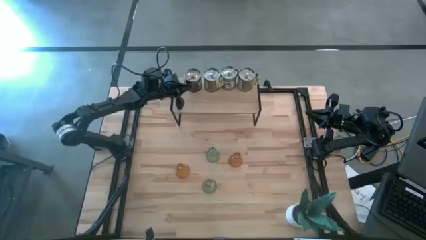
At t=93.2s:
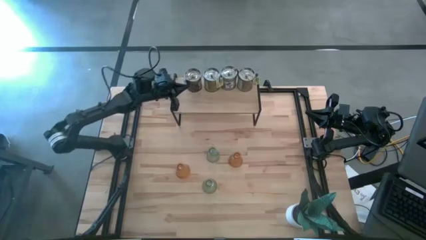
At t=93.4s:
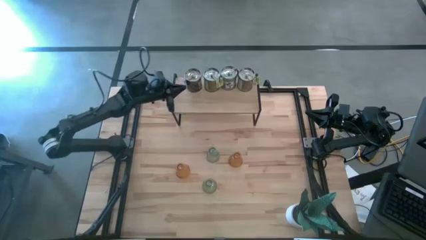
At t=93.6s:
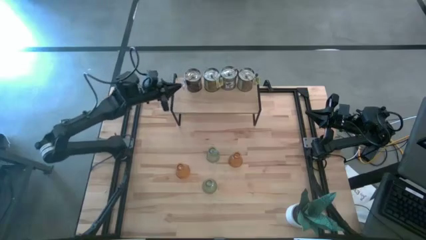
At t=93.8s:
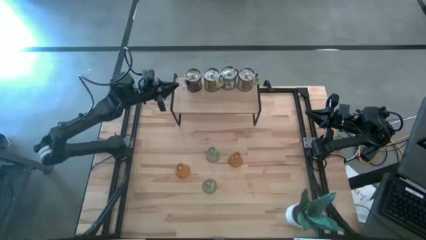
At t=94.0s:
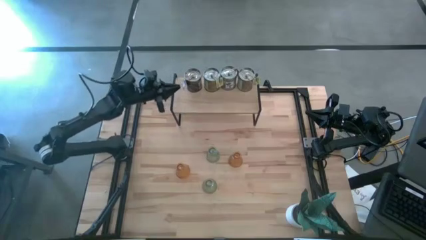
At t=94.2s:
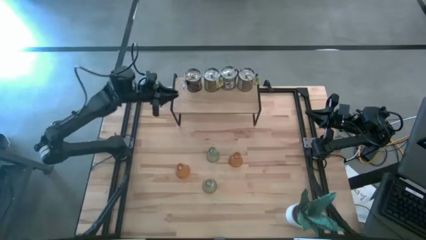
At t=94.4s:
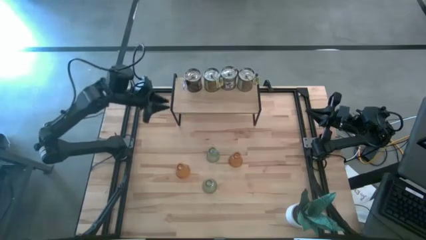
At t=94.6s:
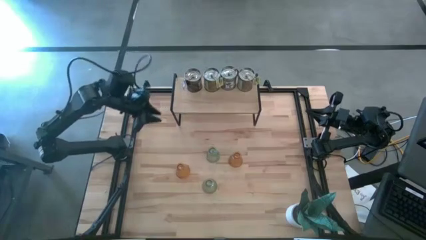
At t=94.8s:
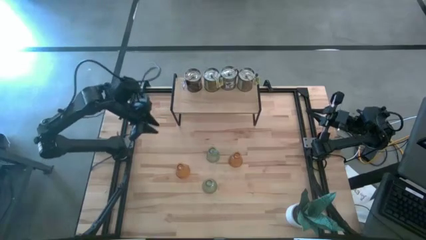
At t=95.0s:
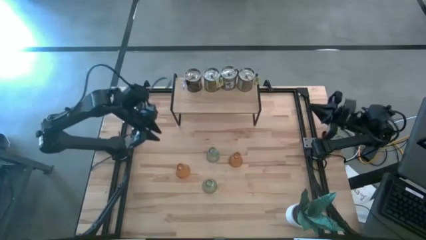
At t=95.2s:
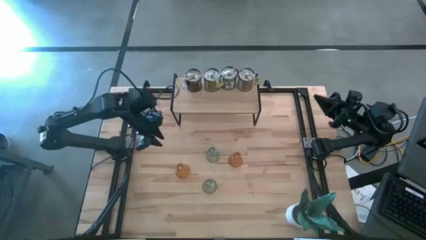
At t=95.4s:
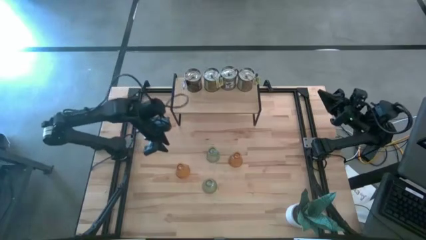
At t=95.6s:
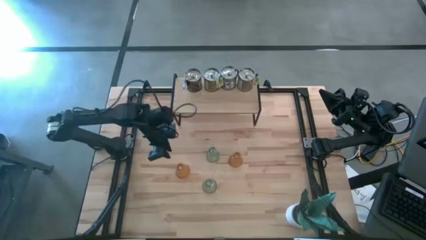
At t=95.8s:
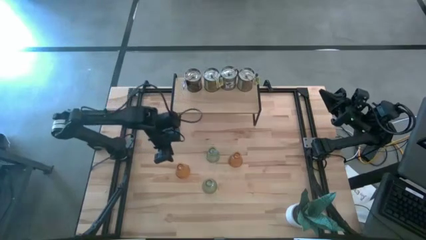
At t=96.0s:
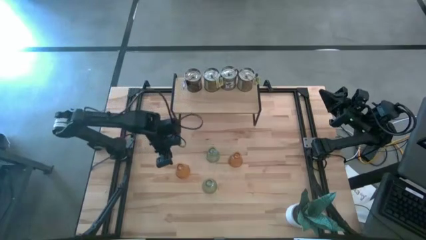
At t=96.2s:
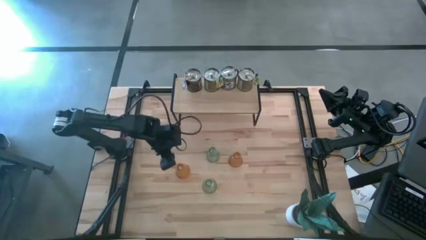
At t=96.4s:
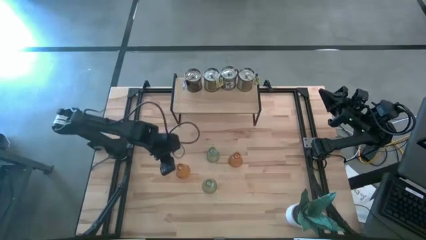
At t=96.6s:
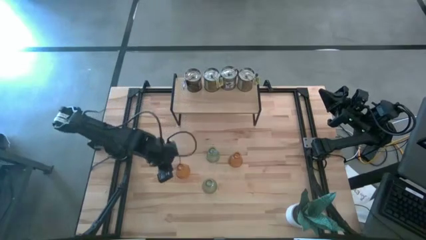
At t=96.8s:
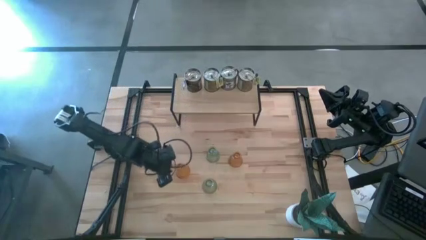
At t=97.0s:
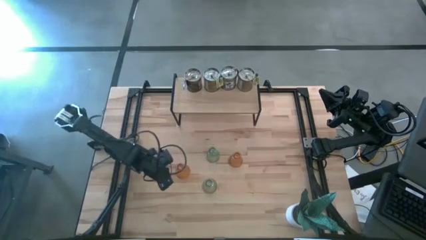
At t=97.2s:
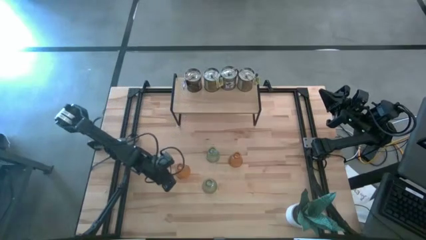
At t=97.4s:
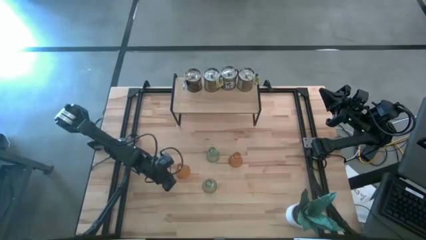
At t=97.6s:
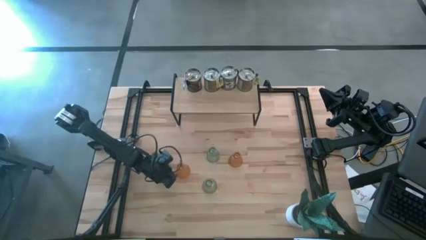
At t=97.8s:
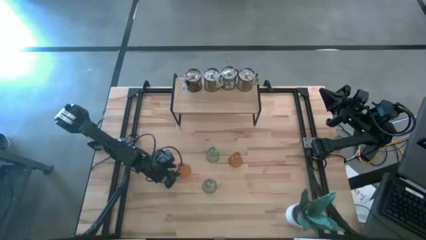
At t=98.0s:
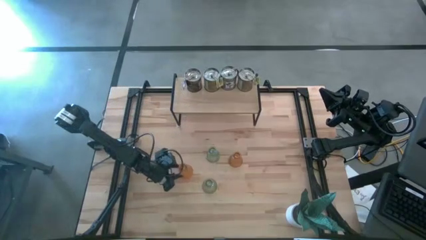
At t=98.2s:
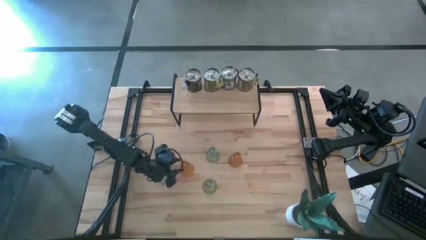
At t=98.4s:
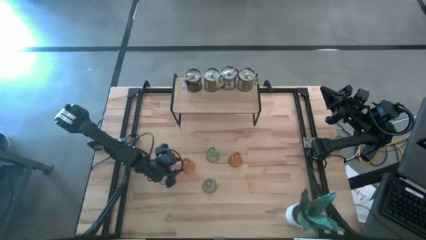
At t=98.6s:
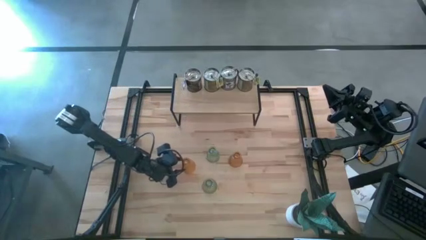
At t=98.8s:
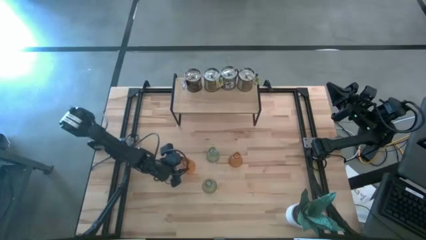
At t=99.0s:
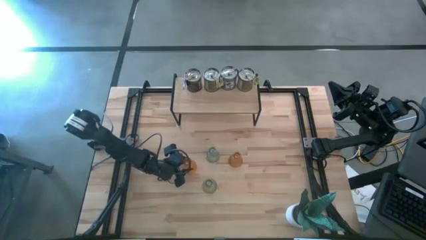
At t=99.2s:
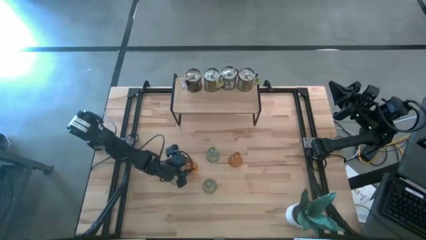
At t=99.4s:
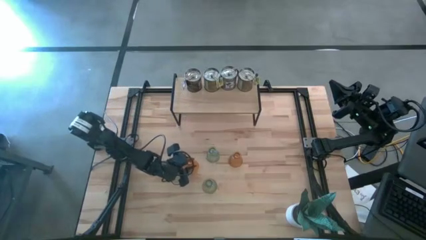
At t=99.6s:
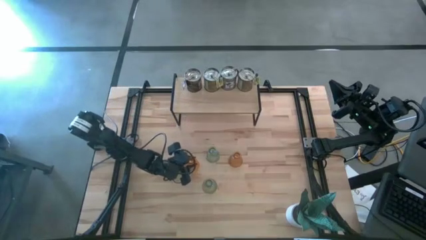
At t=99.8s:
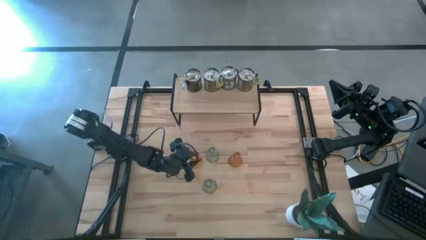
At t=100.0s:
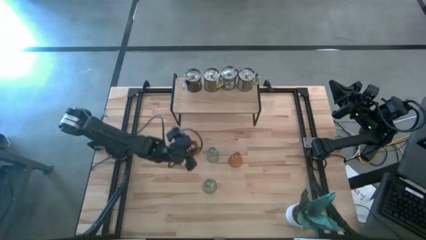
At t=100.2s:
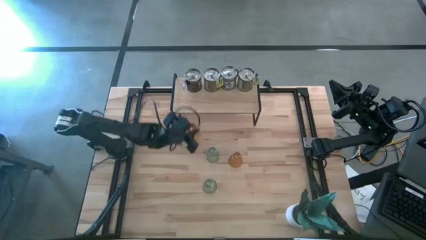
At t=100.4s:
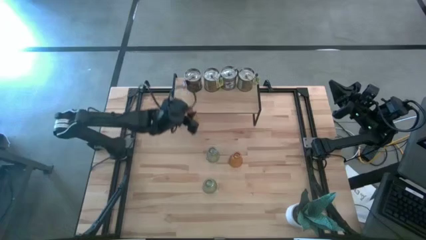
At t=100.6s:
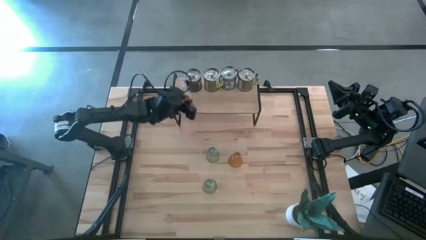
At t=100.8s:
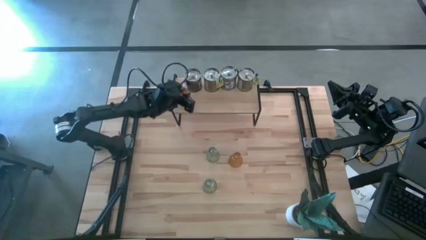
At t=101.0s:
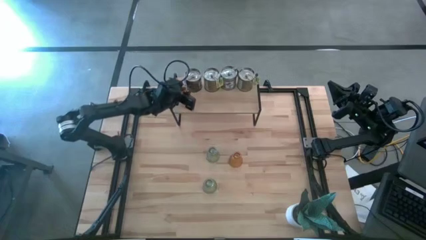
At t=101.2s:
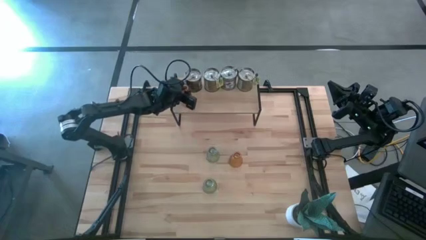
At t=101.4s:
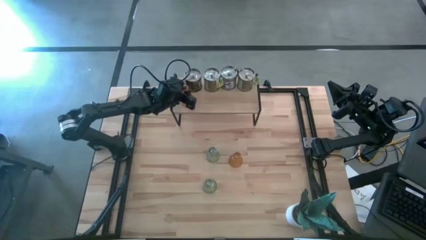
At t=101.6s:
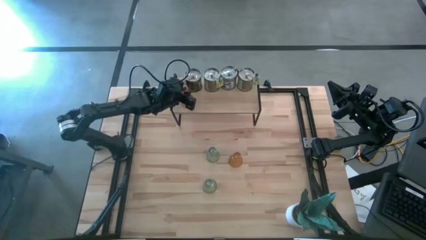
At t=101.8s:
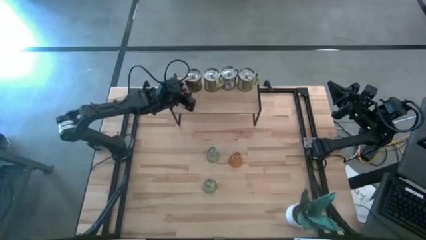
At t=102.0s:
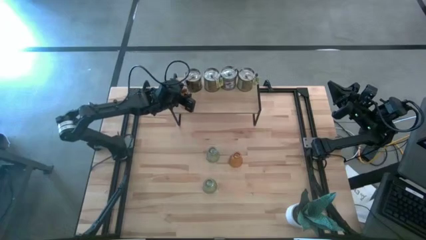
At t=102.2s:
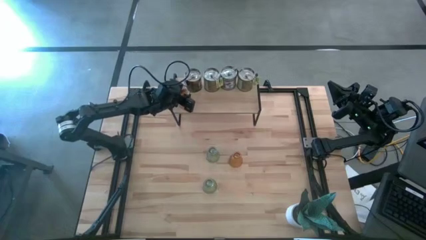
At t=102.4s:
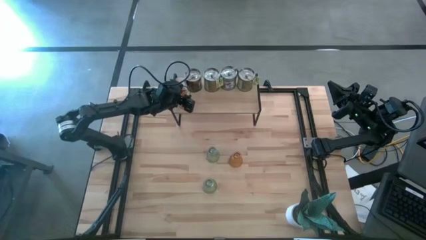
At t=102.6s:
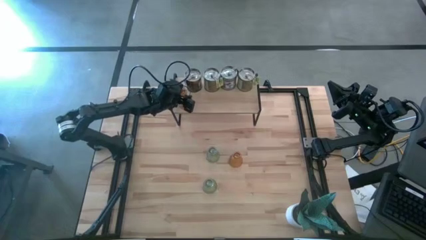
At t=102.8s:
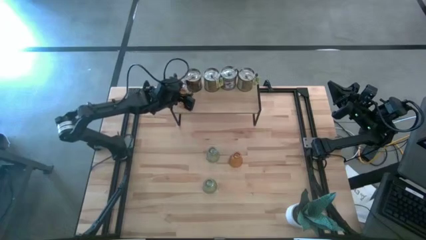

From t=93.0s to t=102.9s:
Task: Pick & Place candle stick holders
Put the orange glass candle holder on the shelf

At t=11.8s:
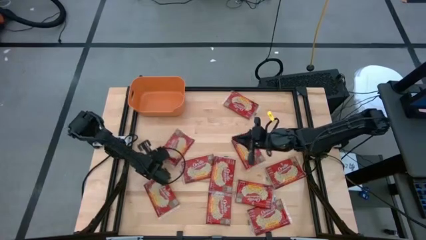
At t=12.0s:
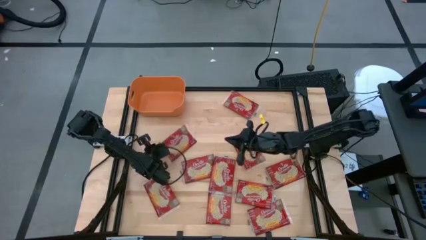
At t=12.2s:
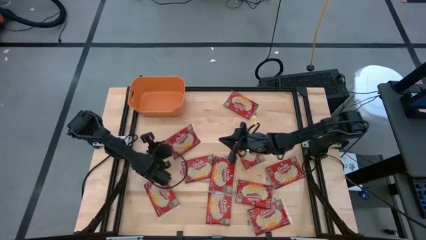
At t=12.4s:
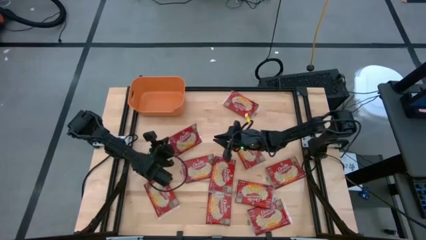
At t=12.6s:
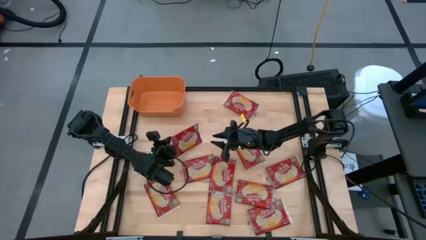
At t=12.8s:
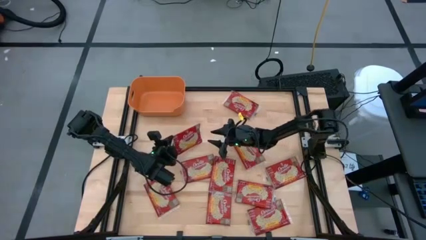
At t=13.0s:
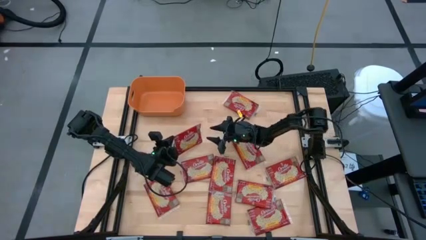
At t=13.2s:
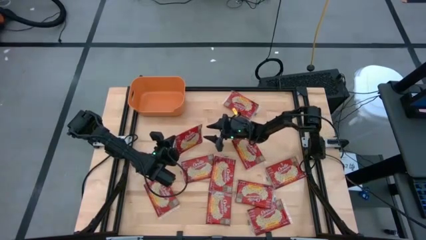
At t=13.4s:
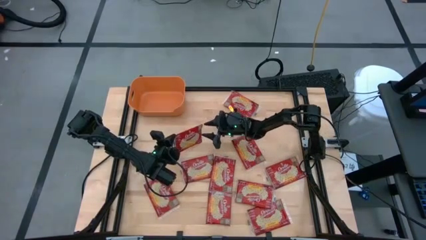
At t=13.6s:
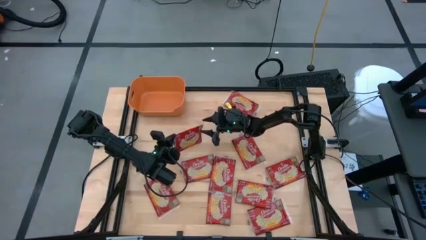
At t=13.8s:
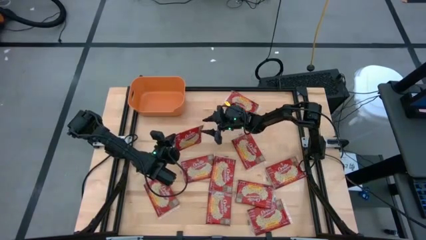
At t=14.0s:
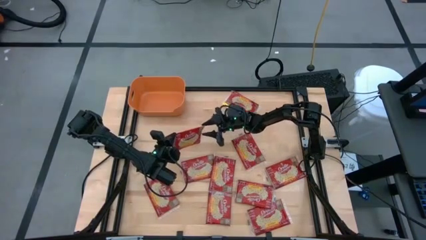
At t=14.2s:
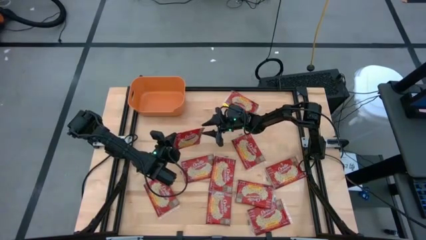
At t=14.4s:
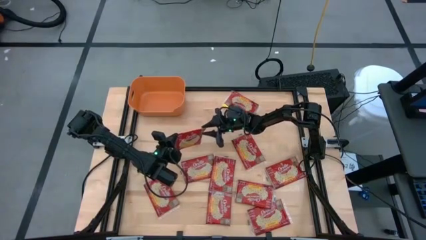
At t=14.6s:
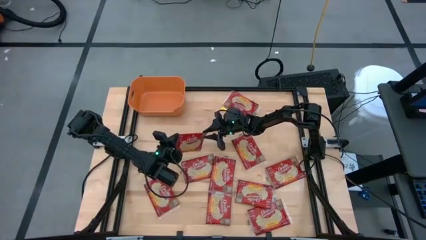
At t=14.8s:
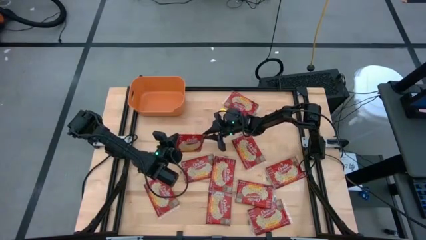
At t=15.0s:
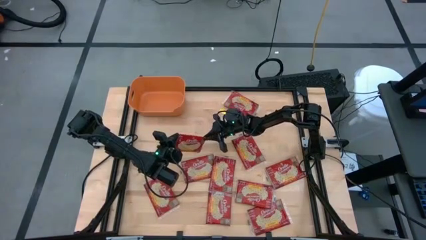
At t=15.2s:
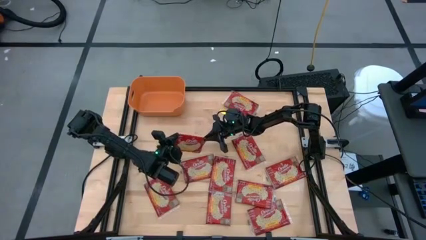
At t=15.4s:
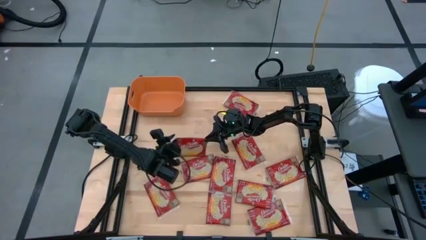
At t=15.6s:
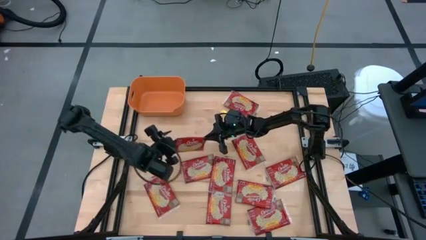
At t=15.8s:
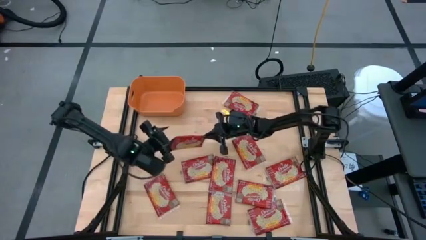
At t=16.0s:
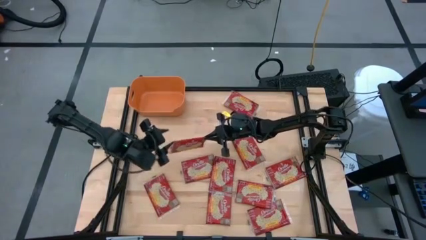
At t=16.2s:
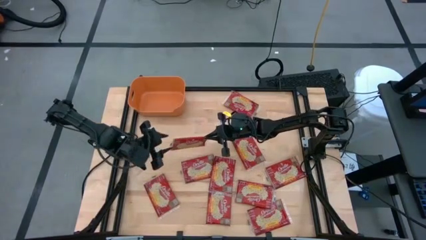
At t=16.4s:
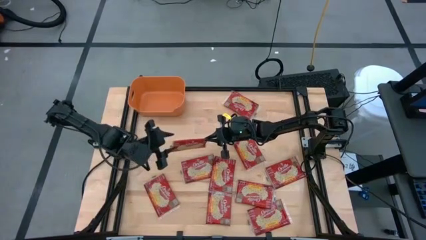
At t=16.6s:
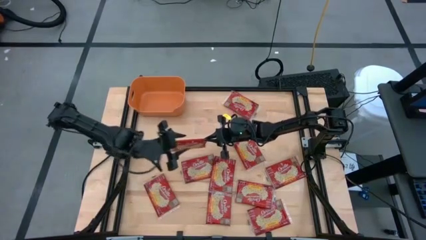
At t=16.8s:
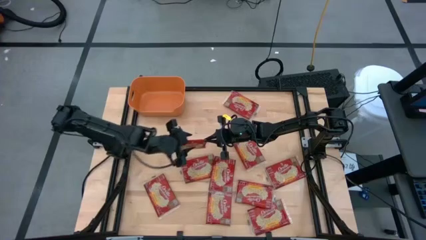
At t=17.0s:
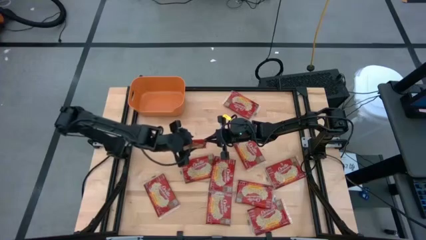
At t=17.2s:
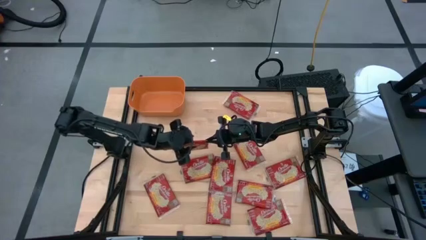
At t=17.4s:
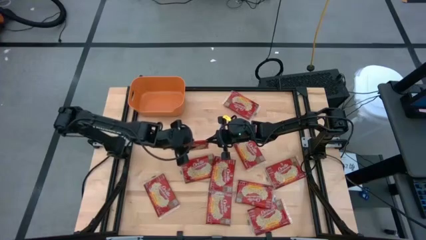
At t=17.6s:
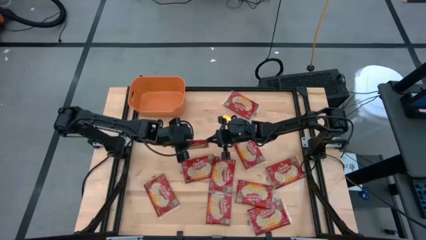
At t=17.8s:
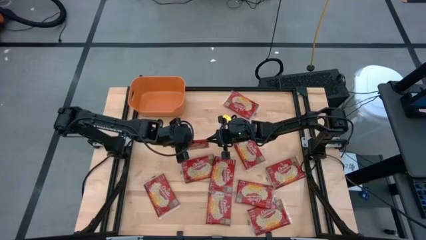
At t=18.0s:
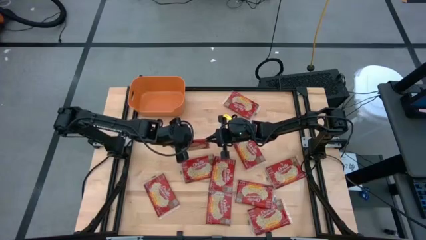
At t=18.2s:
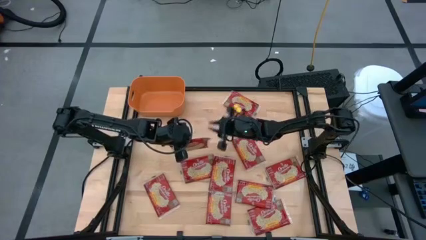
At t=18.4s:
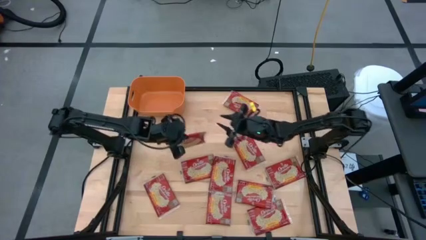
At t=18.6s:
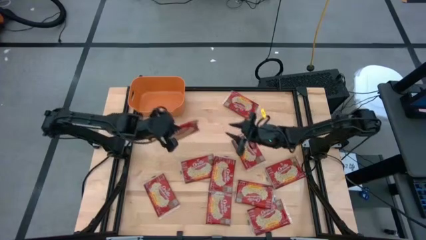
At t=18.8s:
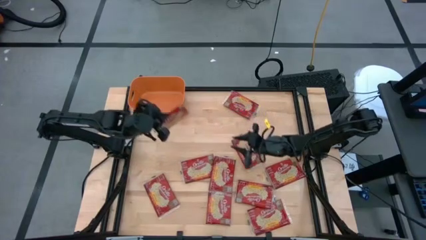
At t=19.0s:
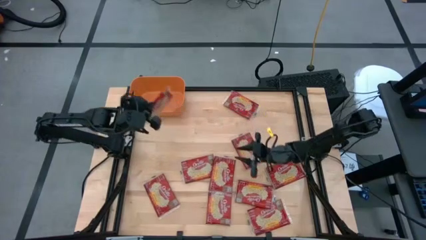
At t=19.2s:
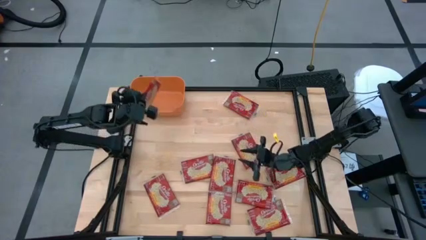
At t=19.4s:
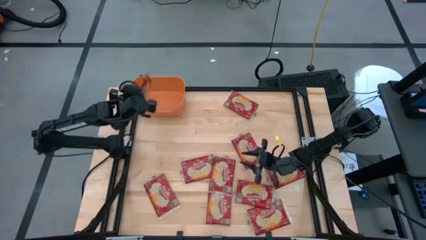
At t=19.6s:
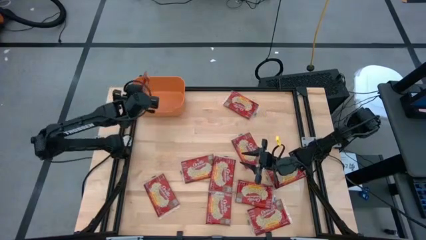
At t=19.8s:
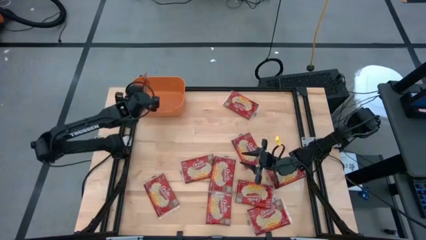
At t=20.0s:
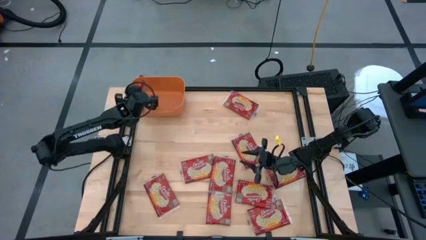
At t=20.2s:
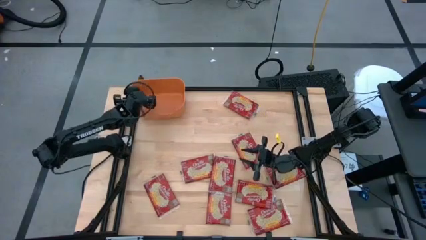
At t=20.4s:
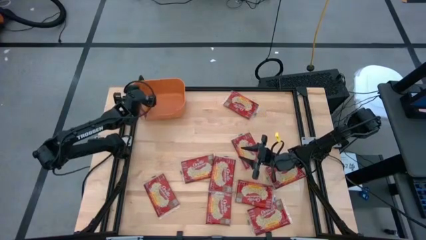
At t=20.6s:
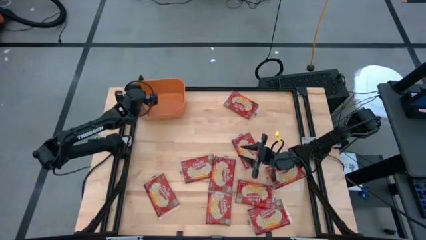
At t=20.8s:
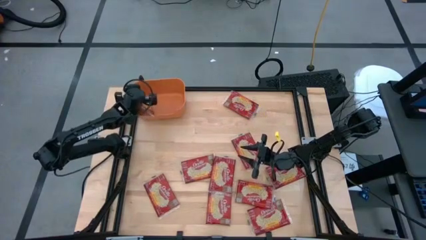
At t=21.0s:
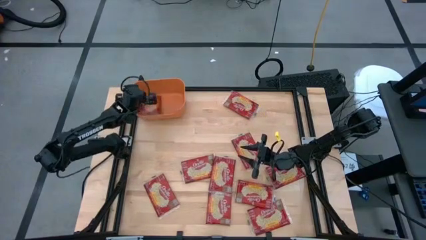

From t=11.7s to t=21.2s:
Task: Sort popcorn bags into baskets
Put the red popcorn bag into the orange bin
